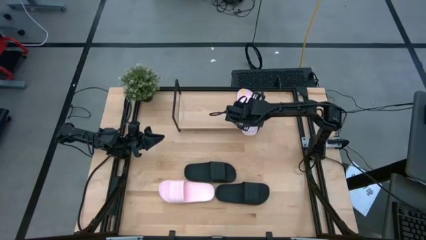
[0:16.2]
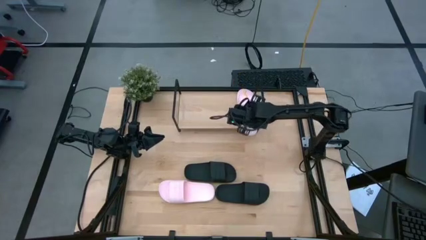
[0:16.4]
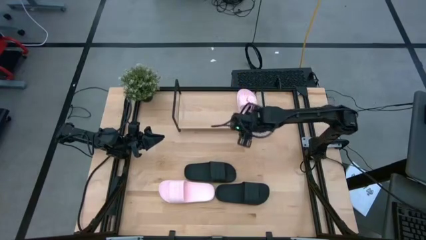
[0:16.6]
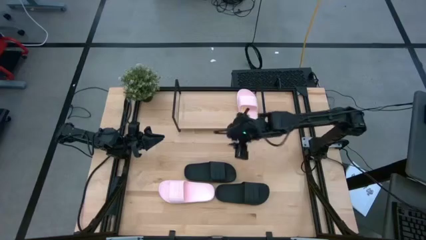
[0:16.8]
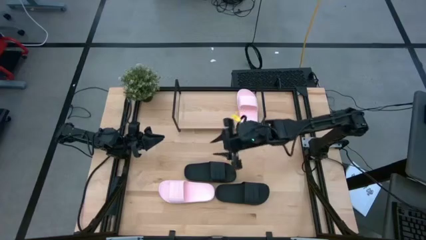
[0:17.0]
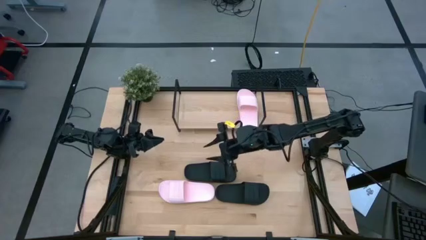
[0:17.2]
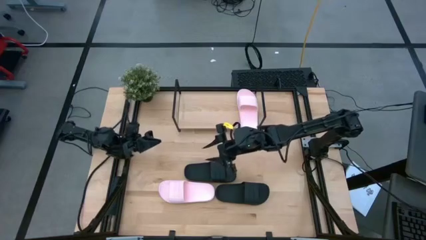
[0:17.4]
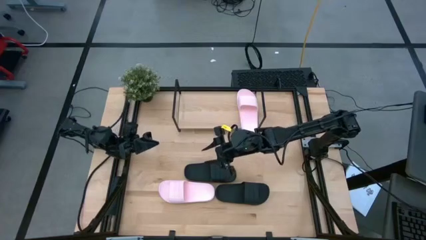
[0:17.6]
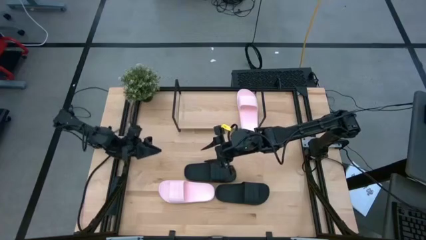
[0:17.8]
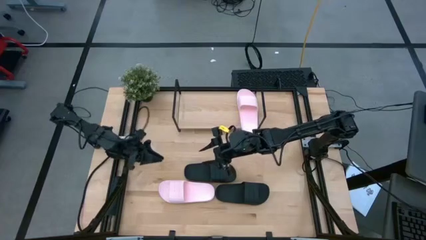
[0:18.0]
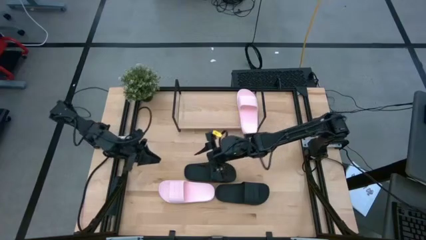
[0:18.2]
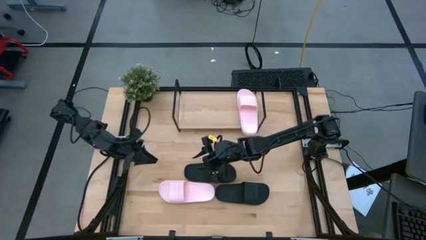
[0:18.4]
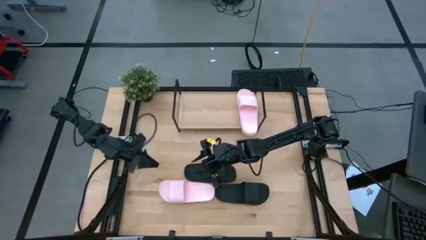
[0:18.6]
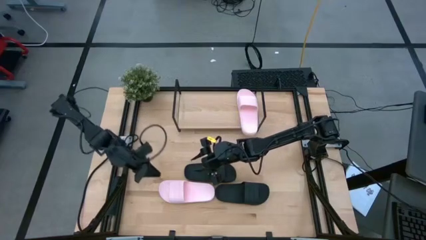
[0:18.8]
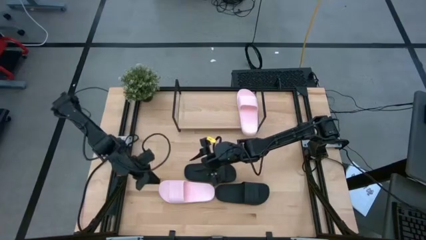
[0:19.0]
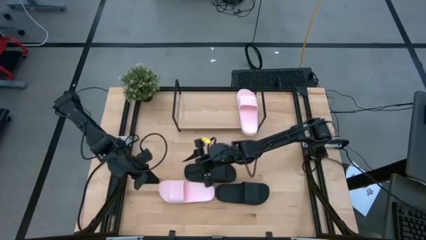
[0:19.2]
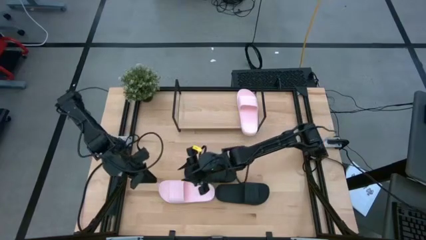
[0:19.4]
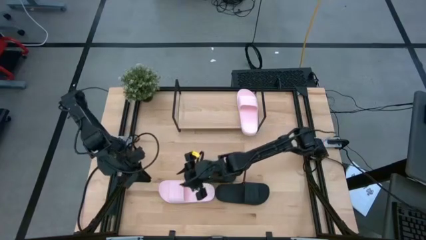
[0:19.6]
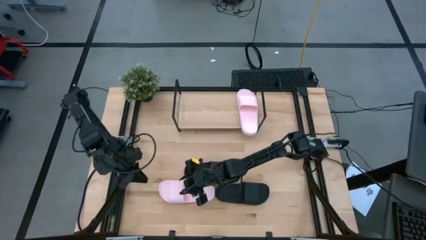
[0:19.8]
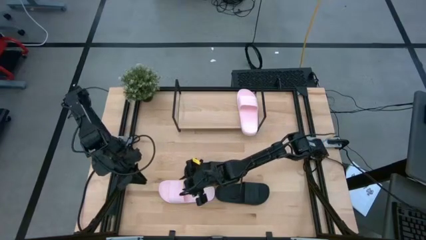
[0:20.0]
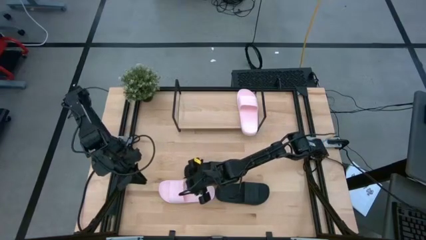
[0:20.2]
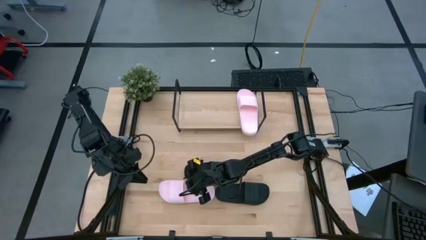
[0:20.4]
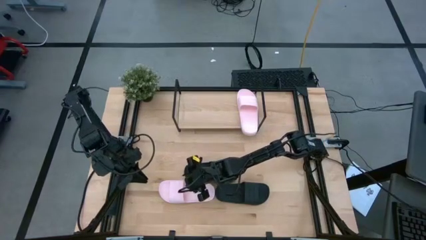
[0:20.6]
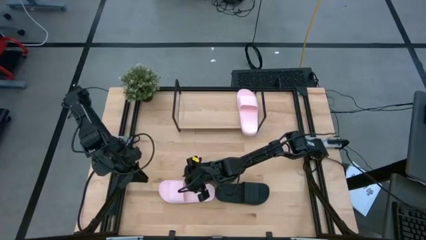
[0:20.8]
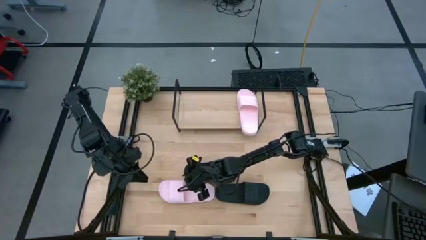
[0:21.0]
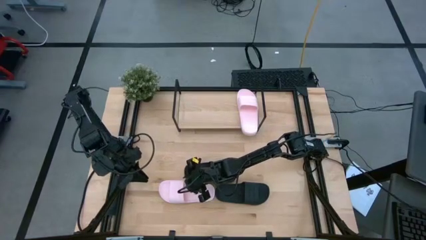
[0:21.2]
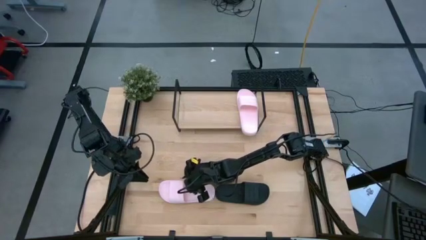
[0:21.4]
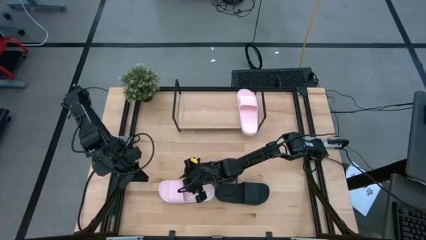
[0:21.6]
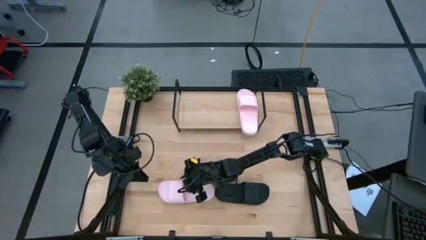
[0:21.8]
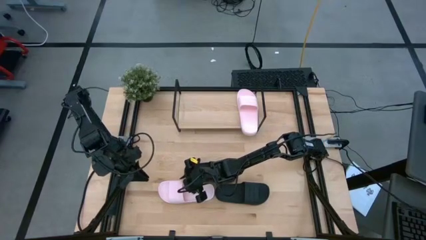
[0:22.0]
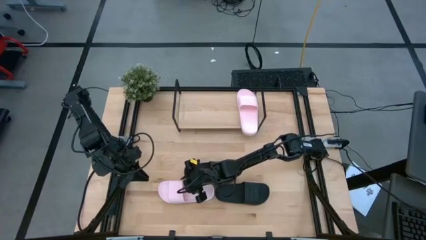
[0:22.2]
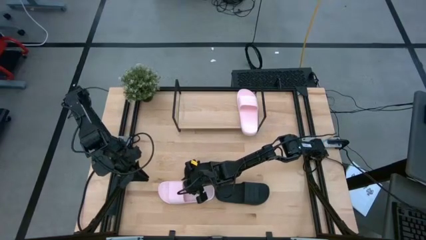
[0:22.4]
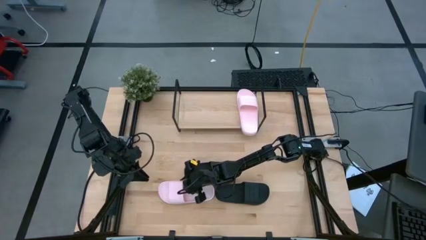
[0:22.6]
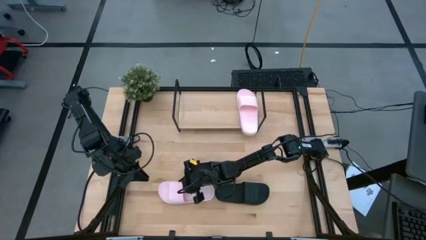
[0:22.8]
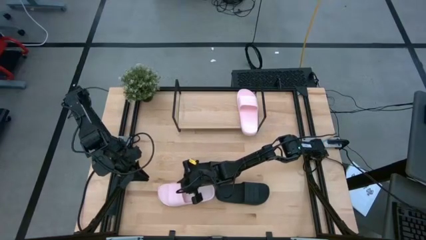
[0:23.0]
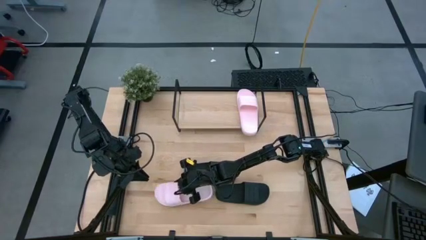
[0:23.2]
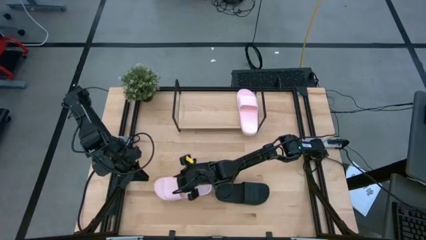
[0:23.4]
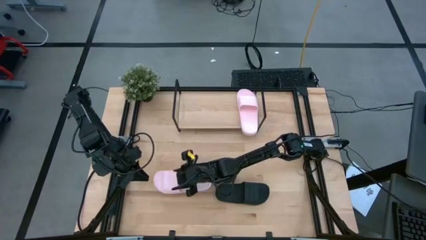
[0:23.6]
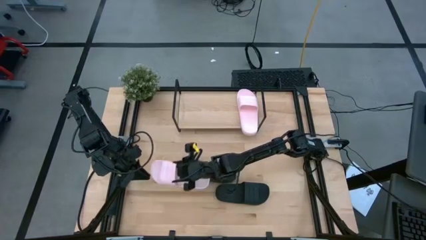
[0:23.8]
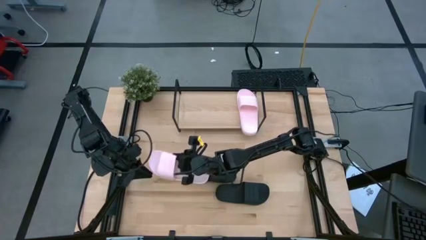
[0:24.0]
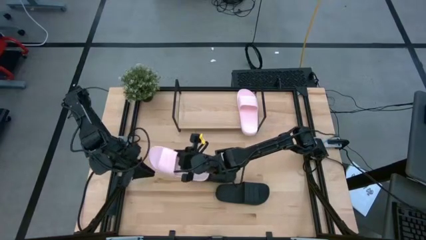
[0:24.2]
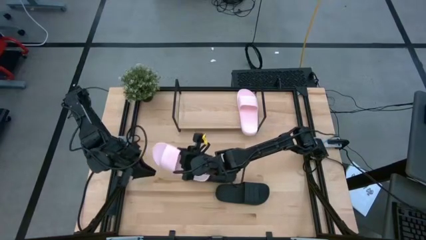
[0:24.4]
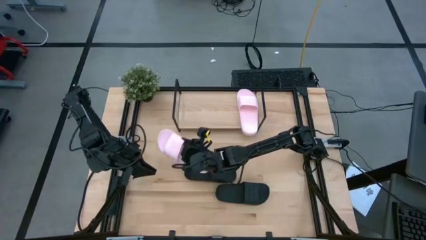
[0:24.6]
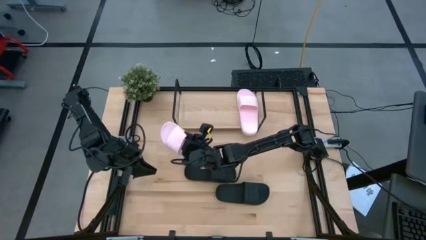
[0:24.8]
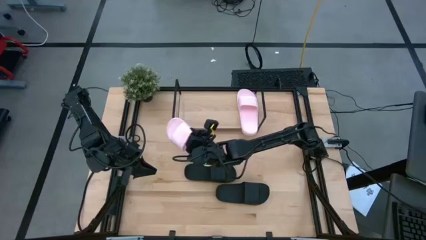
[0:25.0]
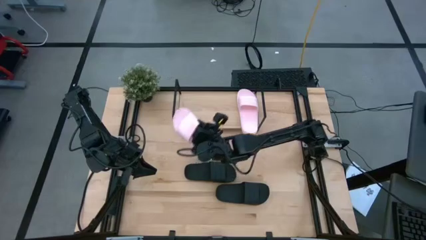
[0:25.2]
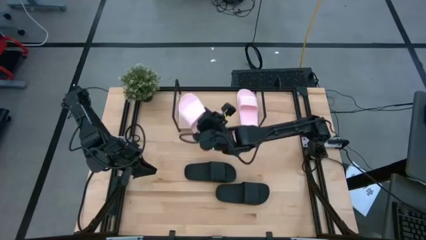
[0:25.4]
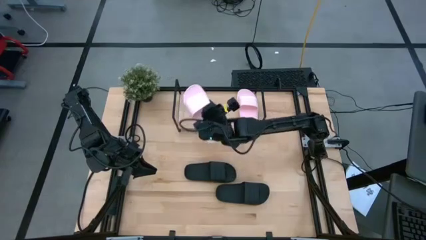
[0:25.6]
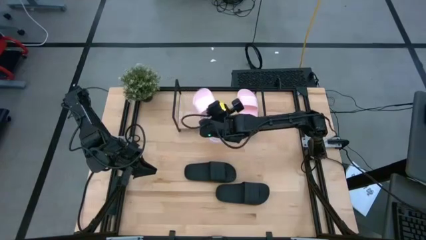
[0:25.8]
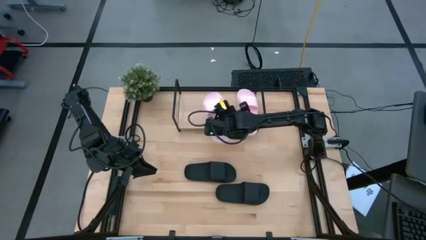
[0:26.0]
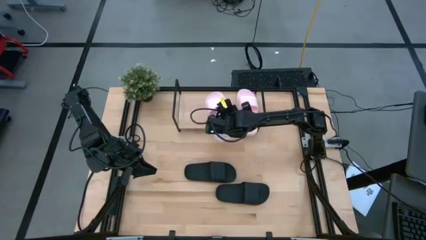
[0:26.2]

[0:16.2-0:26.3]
Task: Pick and place slides into the shelf
Put the pink slide on the shelf
